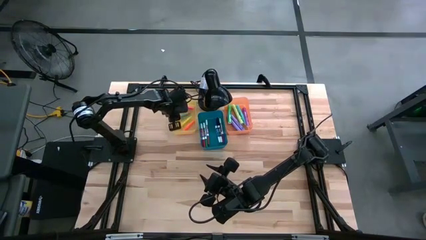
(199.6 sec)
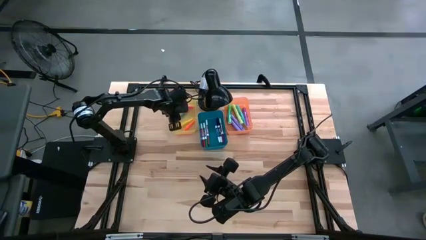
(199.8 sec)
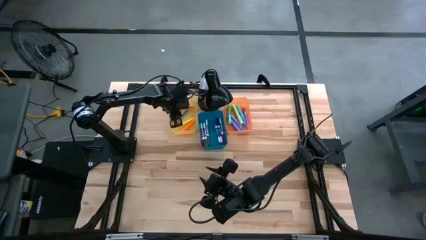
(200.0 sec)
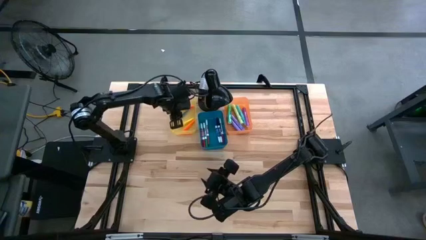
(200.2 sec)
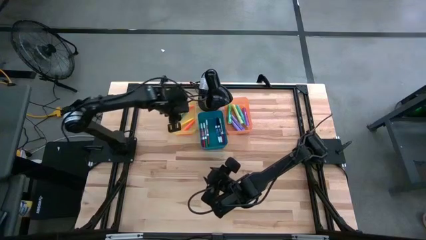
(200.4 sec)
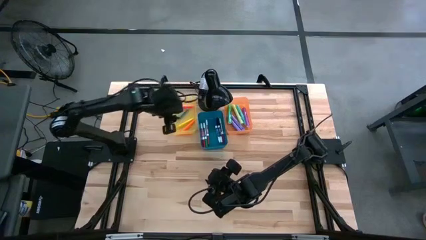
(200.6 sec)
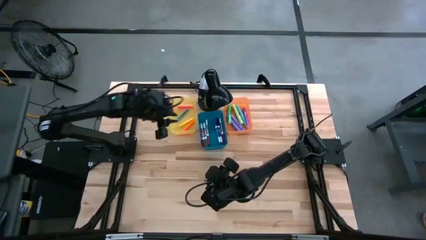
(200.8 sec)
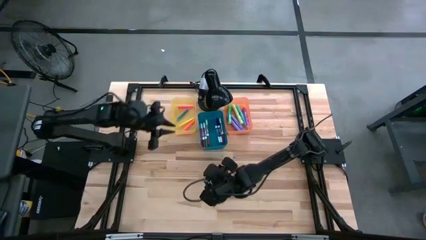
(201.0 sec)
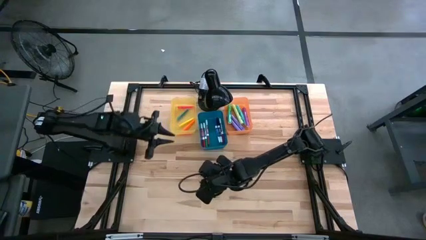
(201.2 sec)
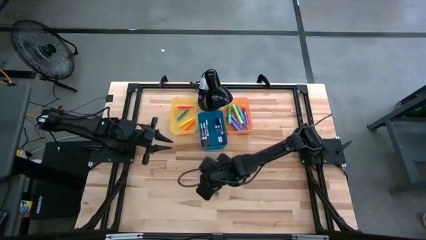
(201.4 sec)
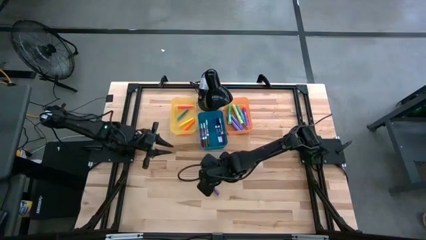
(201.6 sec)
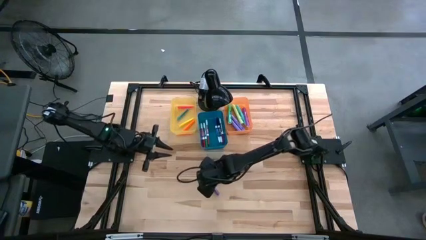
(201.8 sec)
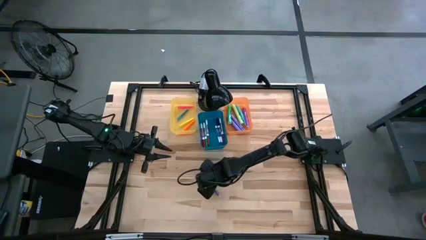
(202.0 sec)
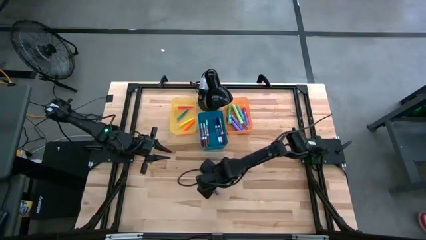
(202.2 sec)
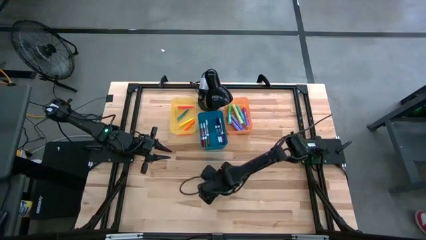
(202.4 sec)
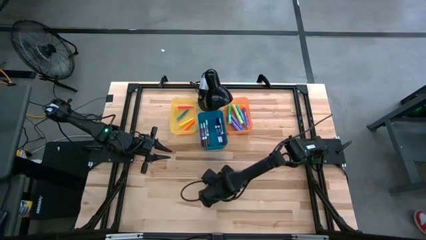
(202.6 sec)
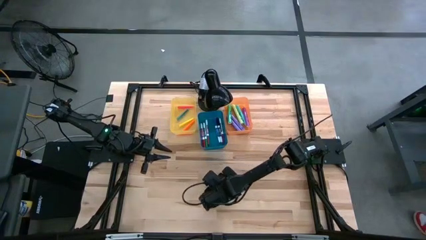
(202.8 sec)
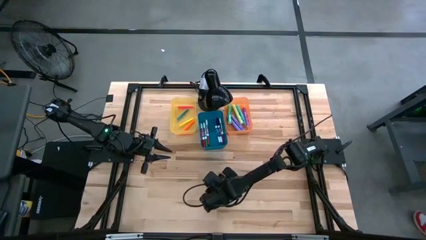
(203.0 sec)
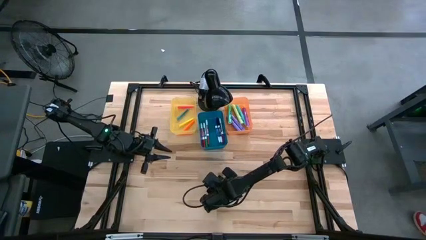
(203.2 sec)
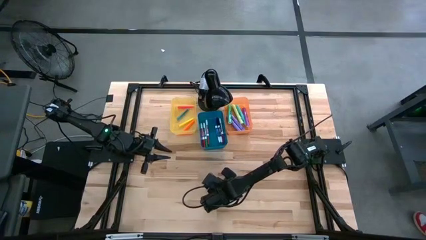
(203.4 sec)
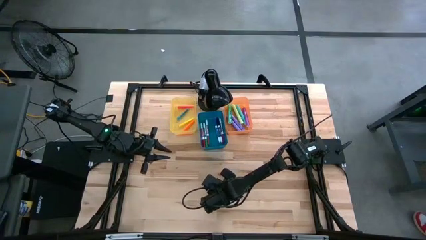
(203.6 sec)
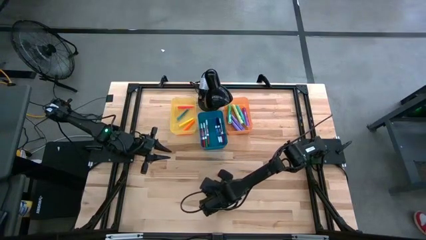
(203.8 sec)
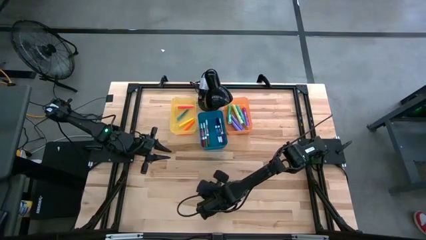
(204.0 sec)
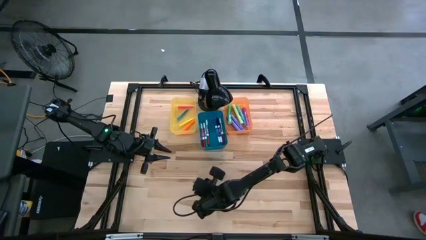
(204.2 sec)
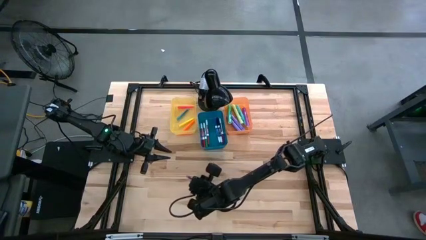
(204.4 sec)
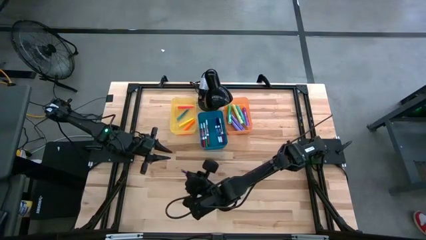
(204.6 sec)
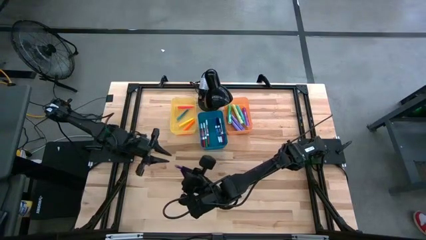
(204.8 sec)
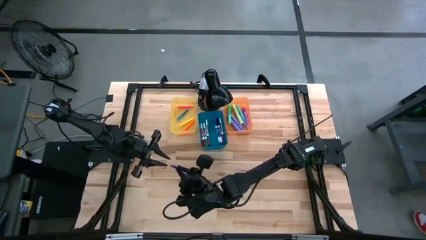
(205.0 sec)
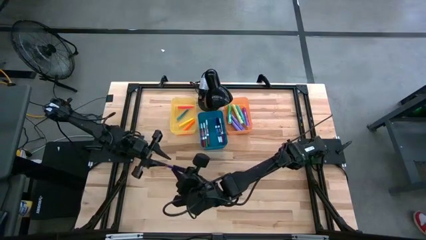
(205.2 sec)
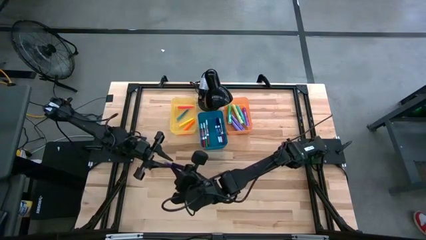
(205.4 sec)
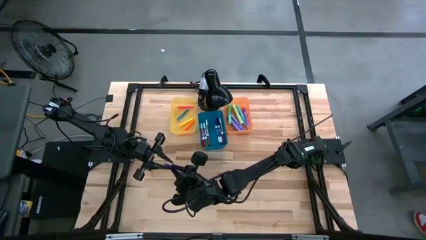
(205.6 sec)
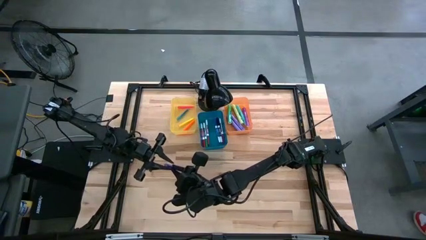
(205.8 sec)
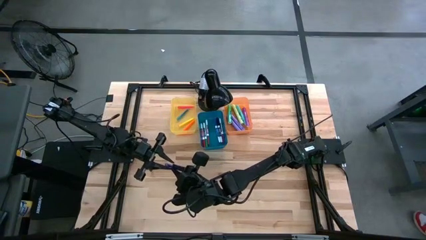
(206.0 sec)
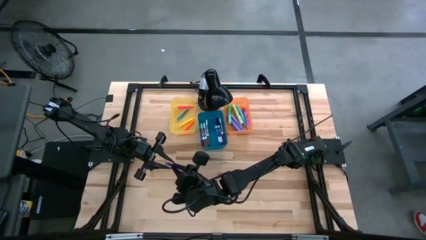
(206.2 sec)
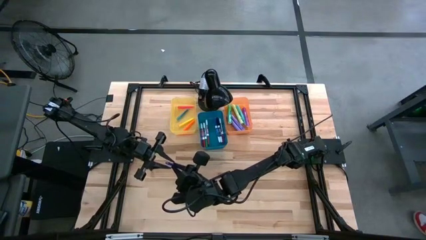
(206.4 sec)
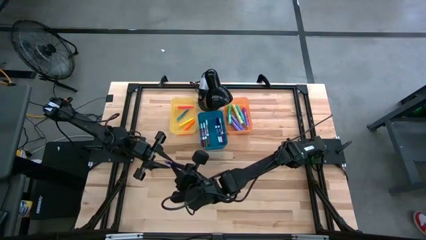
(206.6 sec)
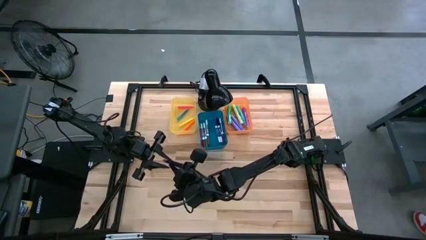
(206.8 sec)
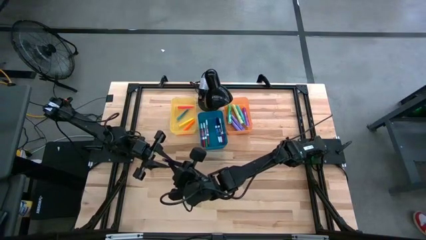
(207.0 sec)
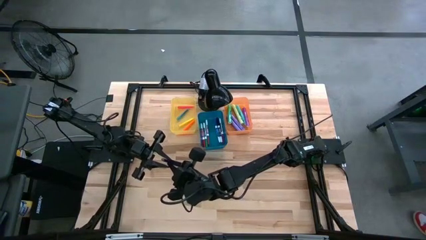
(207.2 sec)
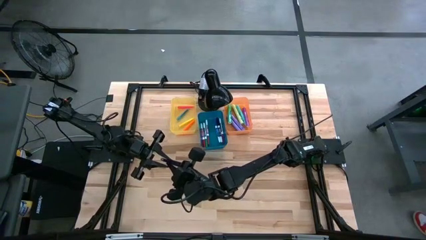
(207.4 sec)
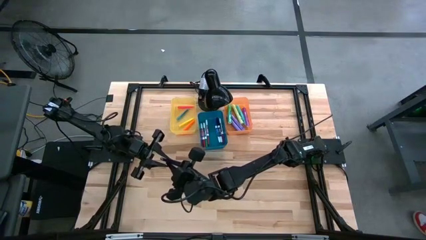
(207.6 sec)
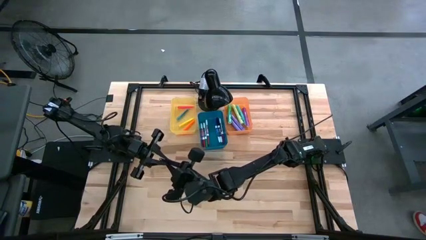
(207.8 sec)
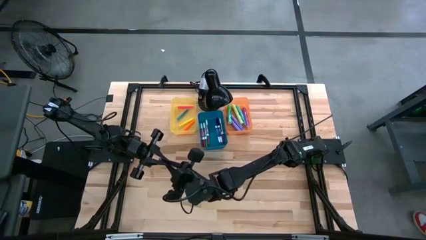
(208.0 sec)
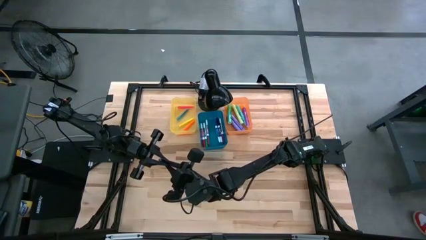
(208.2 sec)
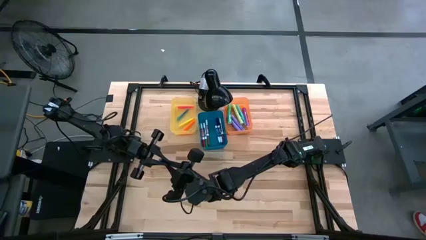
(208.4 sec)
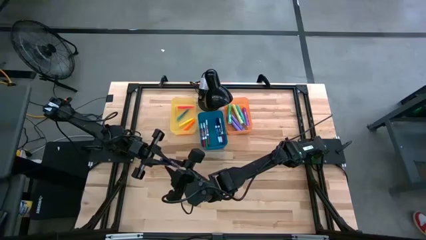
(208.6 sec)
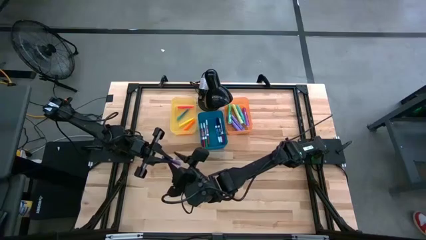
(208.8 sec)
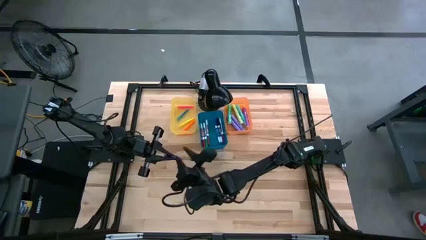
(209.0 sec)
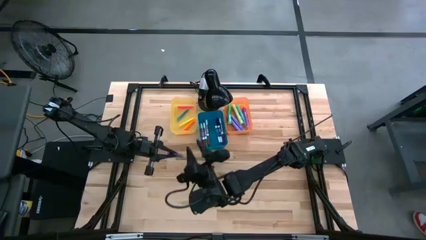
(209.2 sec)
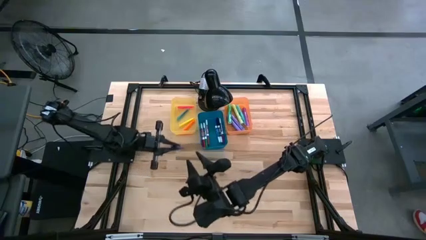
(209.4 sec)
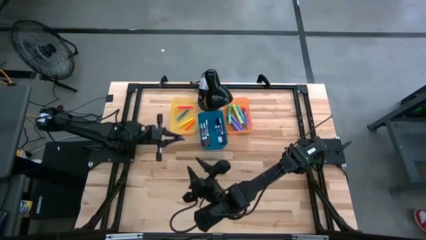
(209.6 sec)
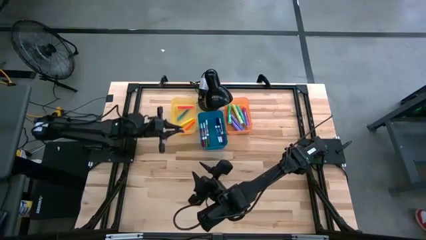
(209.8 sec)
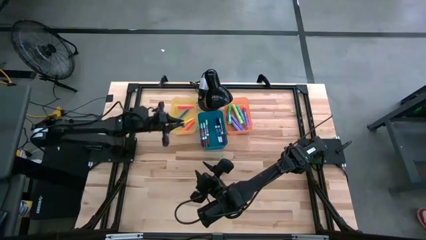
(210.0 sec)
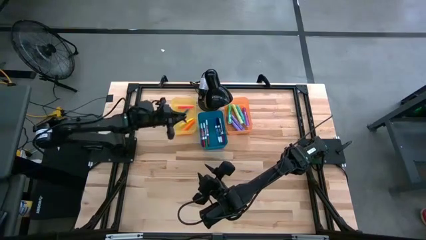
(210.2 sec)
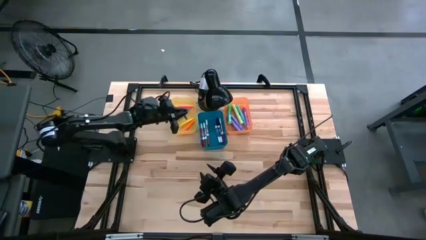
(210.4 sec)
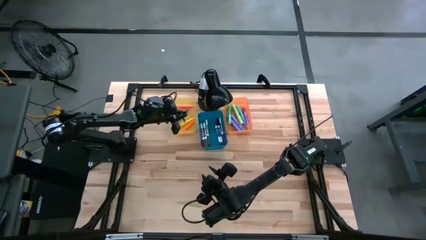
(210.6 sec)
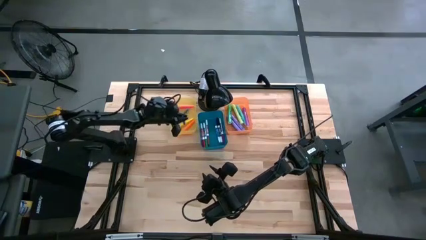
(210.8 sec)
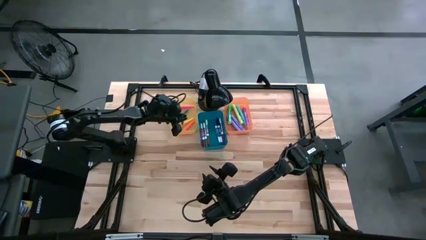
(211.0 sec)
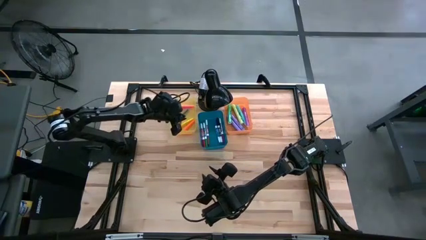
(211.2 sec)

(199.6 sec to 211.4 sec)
Task: Pick & Place Markers
Put the purple mini marker into the yellow bin

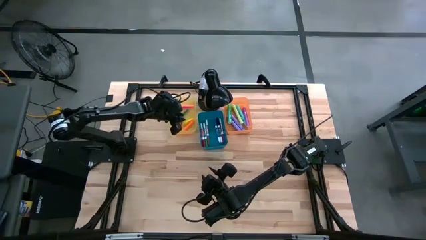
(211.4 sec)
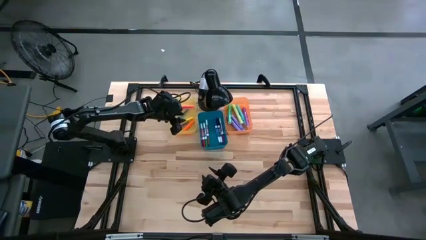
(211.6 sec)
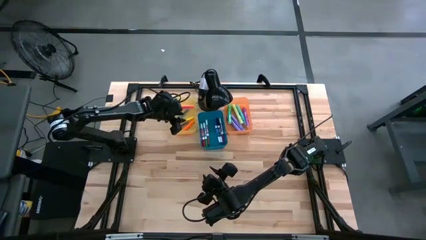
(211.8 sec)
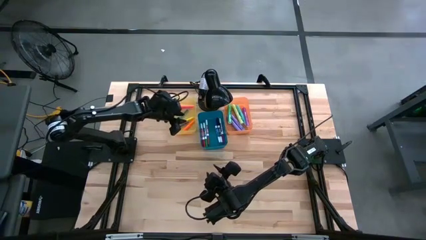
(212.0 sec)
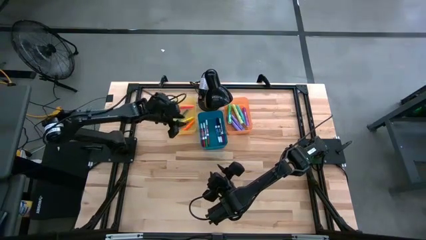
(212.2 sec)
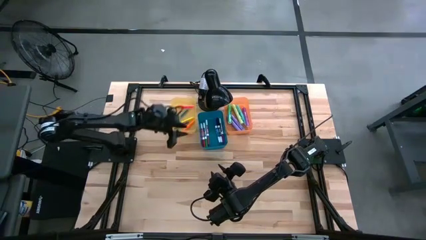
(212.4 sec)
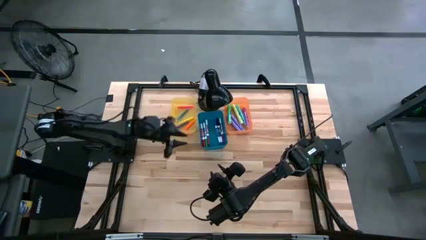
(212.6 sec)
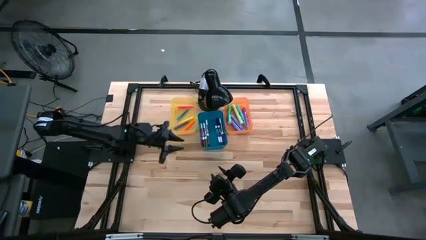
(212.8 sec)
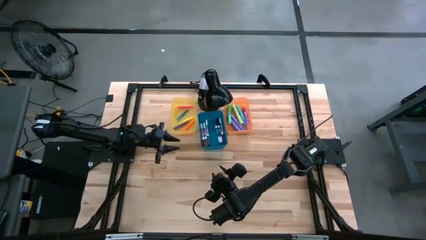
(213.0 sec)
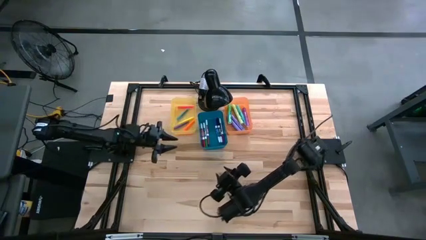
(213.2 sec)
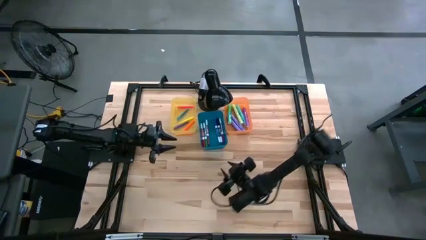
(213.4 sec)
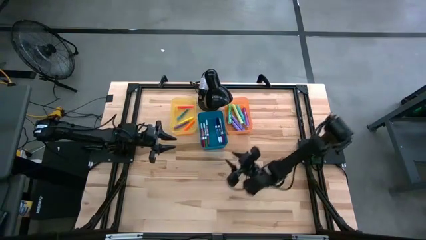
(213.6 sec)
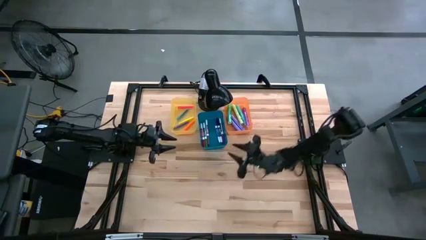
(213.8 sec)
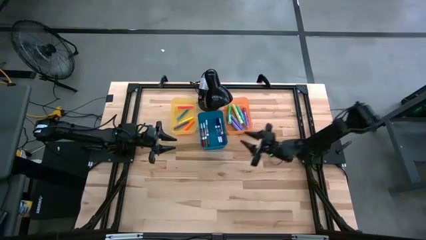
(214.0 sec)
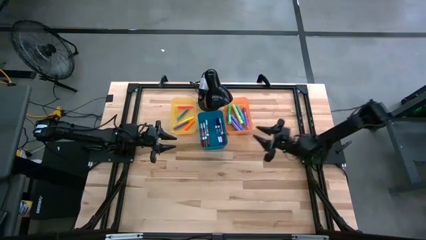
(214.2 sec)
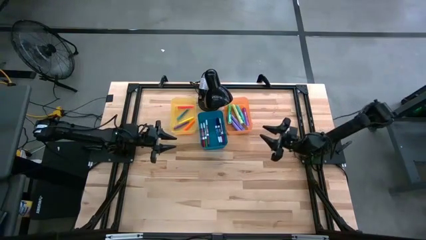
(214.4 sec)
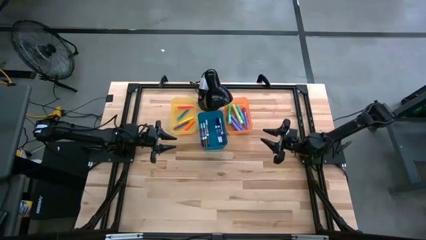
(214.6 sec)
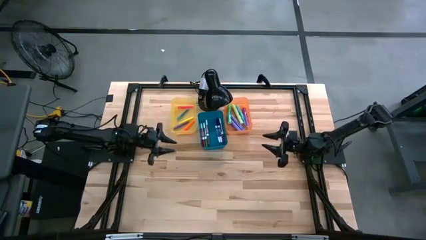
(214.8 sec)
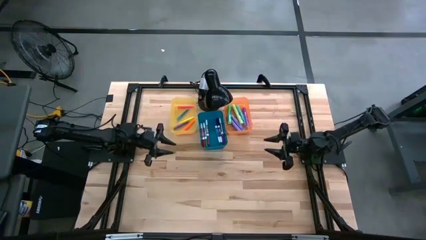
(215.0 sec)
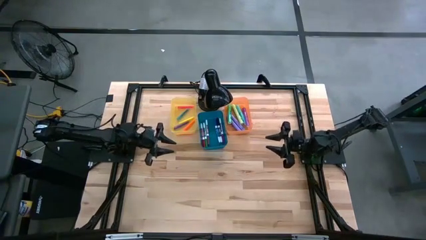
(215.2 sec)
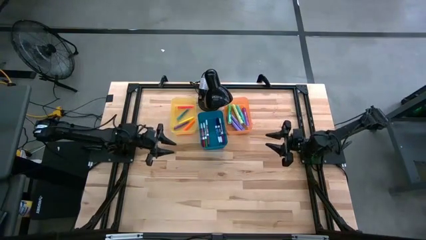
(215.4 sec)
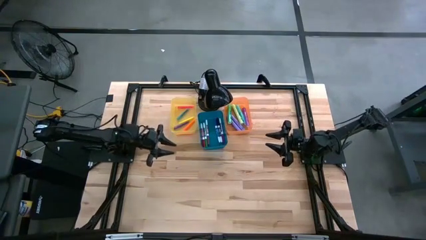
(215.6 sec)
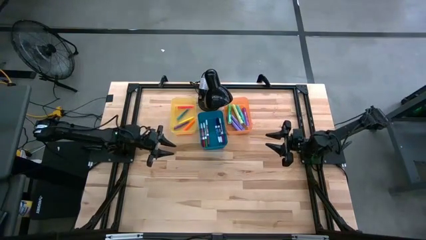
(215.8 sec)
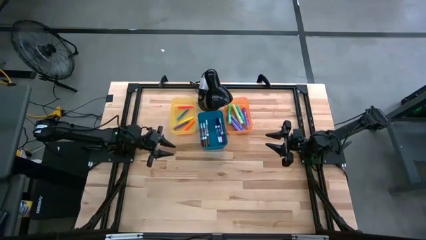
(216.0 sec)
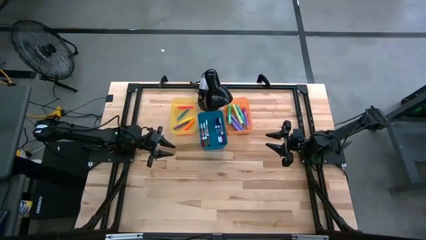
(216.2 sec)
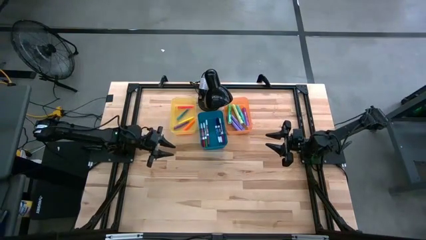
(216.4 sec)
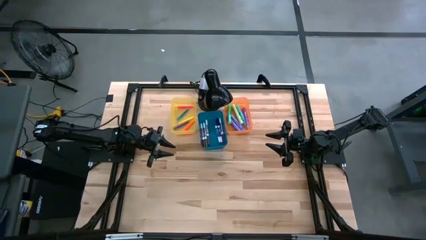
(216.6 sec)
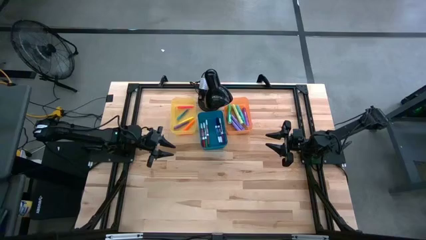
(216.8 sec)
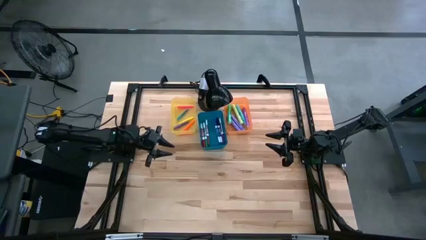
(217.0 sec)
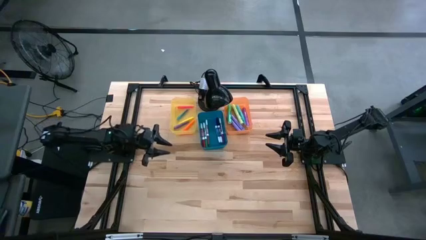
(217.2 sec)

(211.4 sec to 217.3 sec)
Return to Home Position
